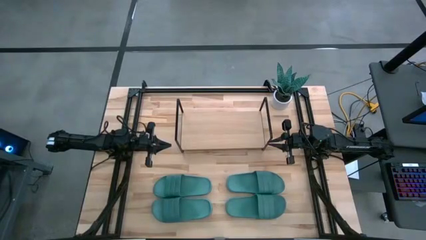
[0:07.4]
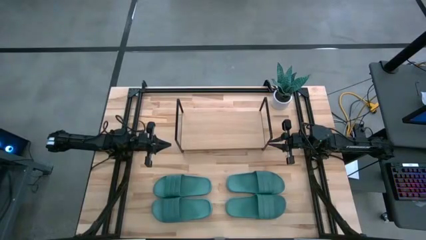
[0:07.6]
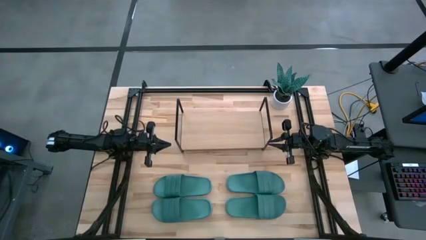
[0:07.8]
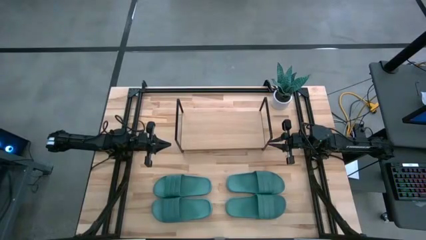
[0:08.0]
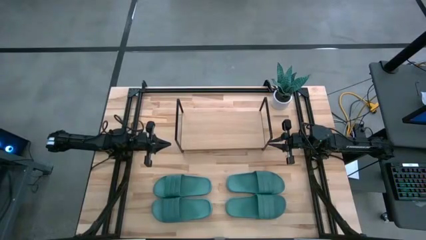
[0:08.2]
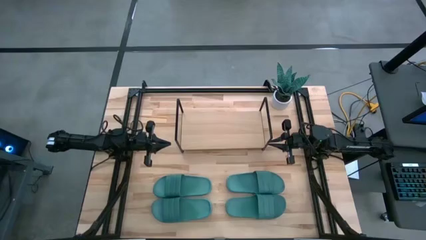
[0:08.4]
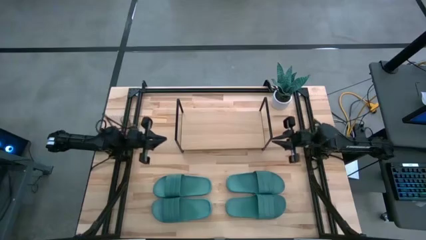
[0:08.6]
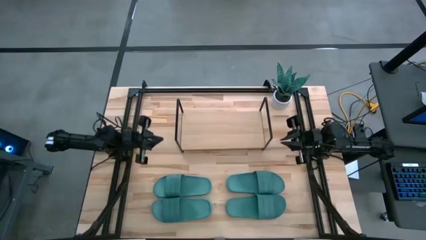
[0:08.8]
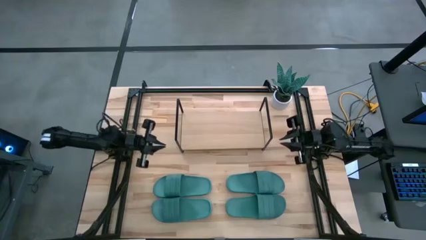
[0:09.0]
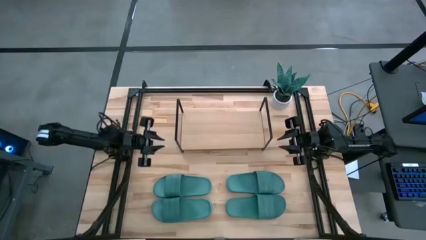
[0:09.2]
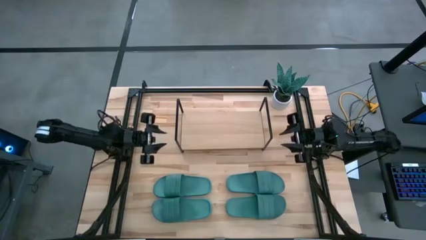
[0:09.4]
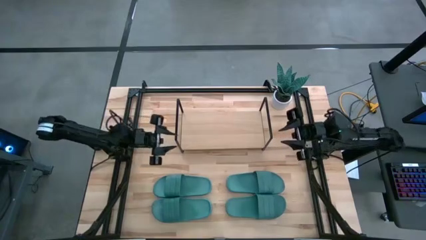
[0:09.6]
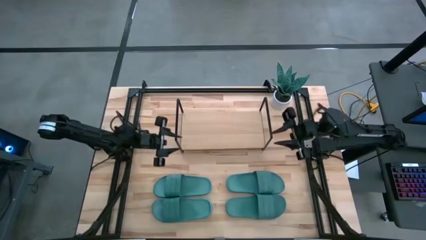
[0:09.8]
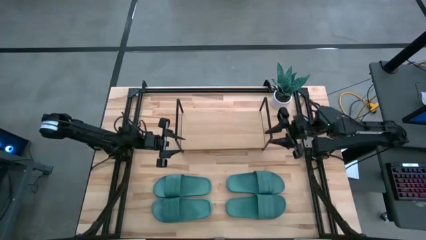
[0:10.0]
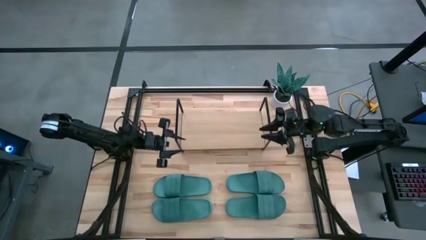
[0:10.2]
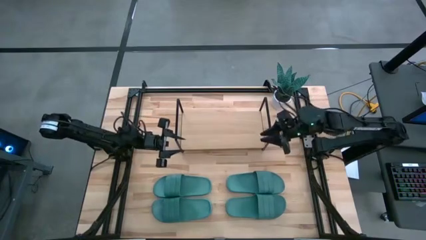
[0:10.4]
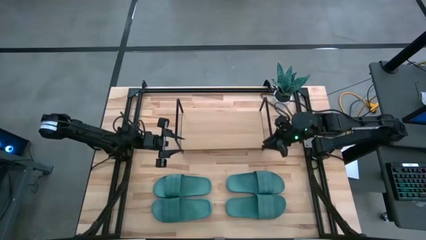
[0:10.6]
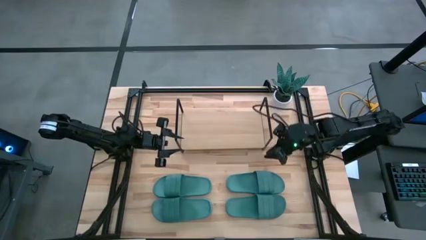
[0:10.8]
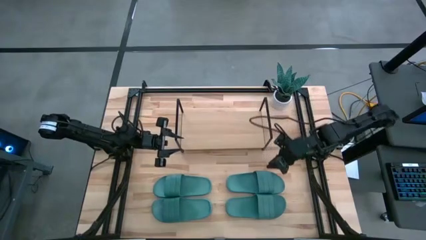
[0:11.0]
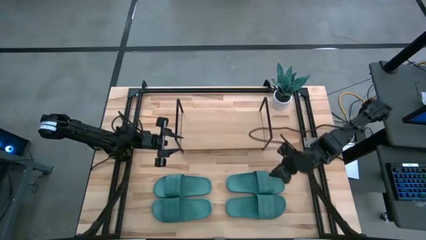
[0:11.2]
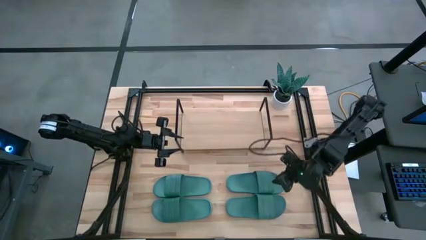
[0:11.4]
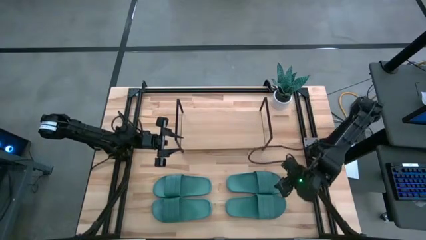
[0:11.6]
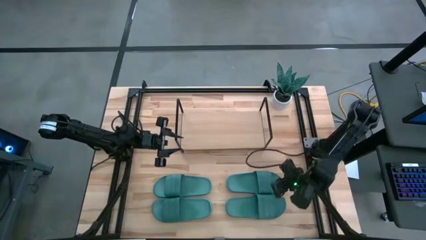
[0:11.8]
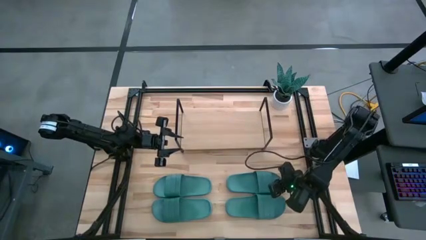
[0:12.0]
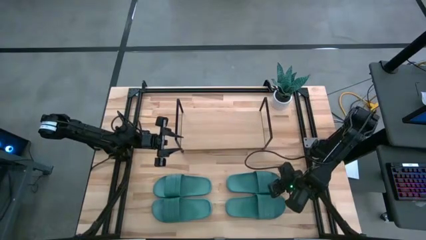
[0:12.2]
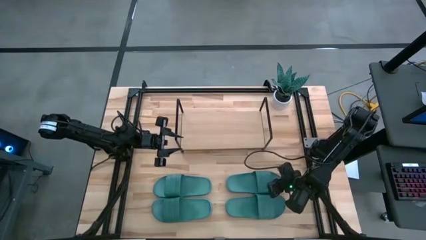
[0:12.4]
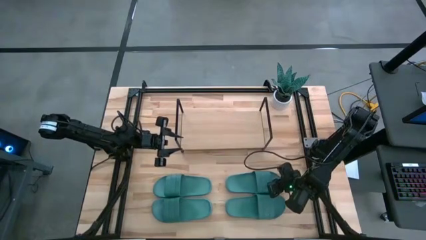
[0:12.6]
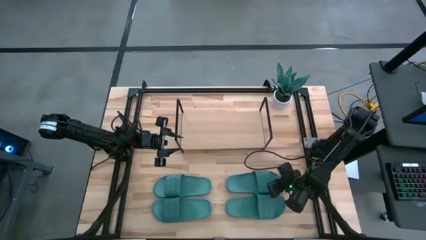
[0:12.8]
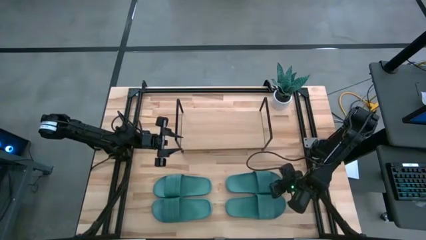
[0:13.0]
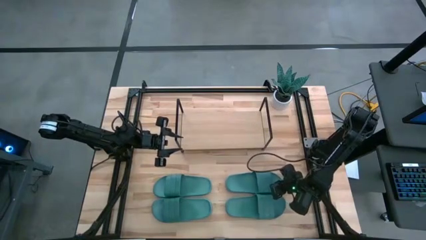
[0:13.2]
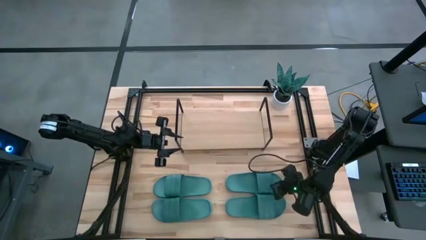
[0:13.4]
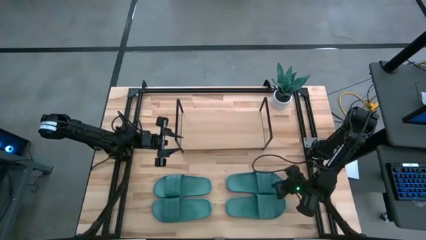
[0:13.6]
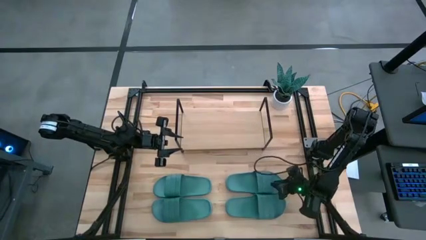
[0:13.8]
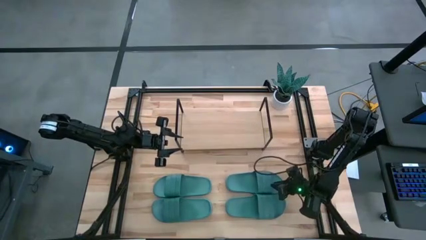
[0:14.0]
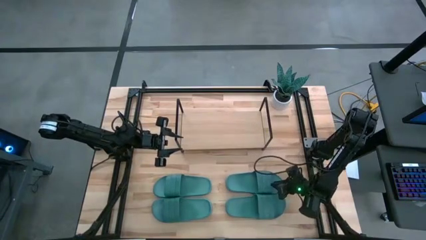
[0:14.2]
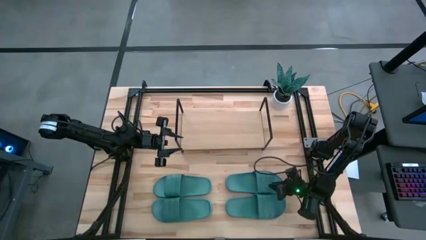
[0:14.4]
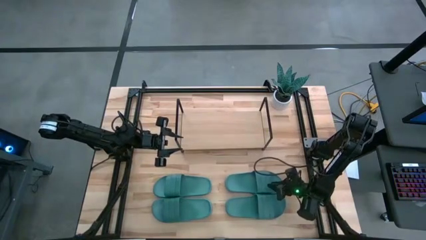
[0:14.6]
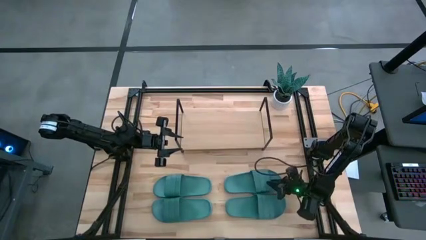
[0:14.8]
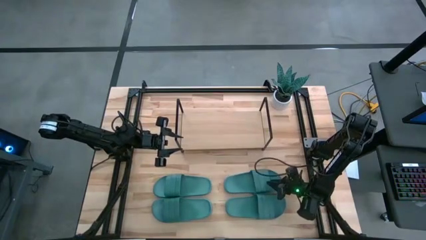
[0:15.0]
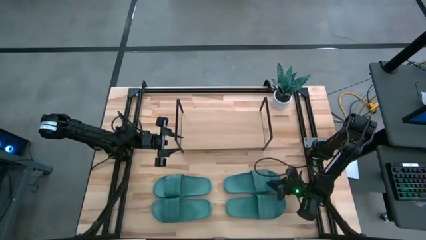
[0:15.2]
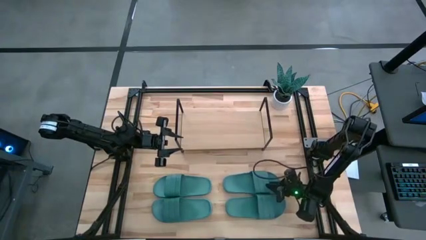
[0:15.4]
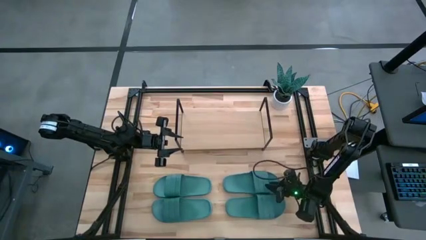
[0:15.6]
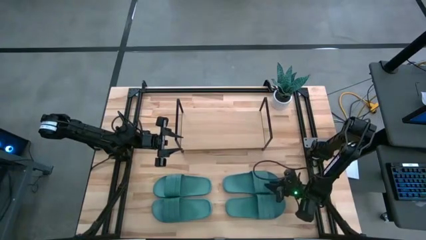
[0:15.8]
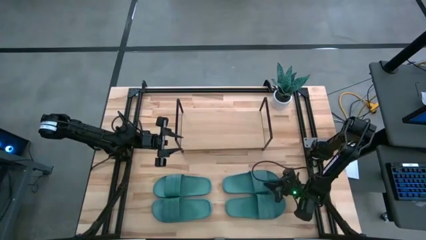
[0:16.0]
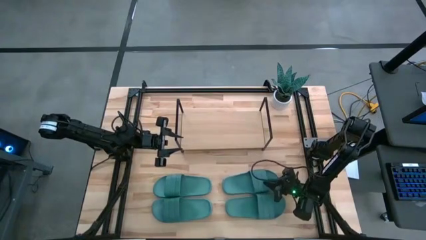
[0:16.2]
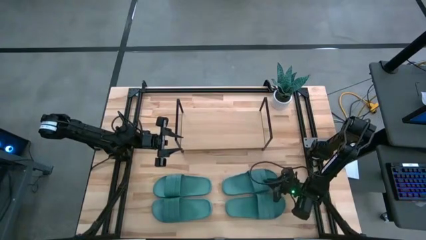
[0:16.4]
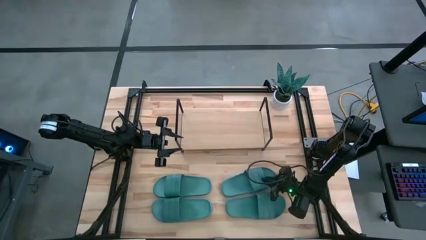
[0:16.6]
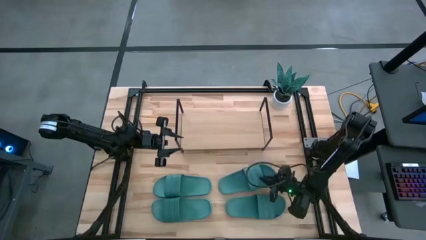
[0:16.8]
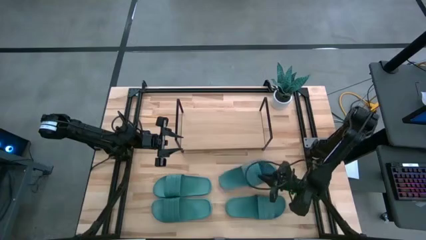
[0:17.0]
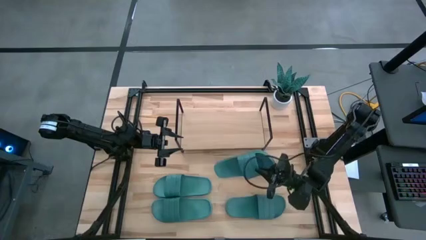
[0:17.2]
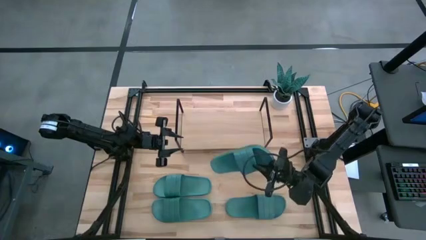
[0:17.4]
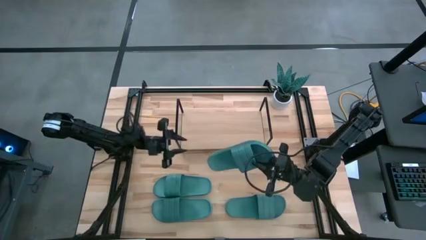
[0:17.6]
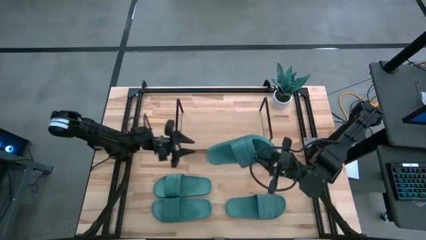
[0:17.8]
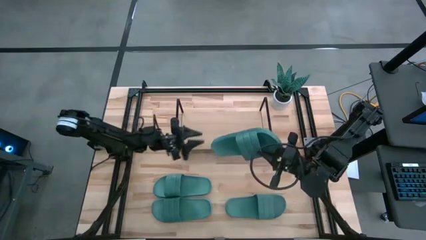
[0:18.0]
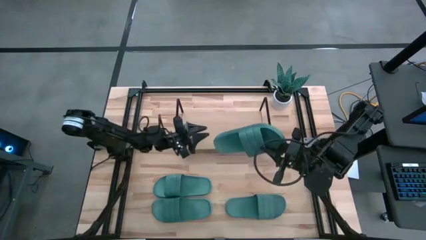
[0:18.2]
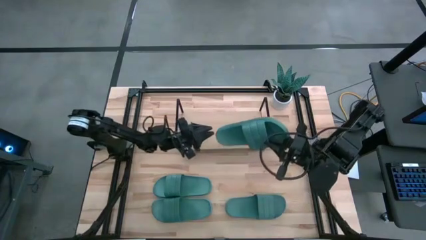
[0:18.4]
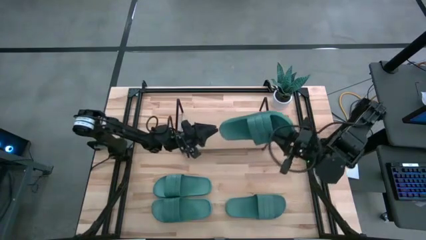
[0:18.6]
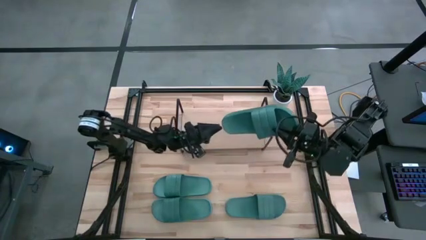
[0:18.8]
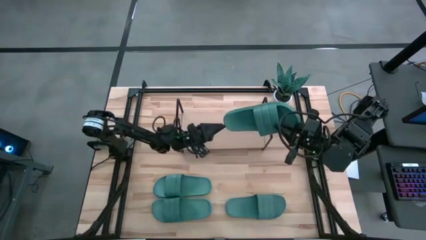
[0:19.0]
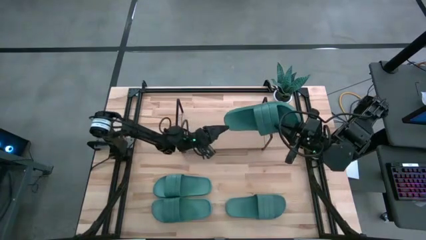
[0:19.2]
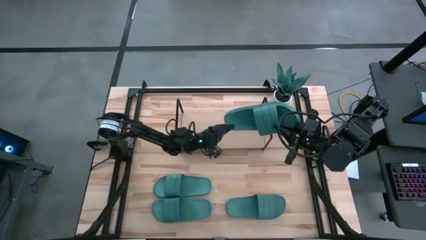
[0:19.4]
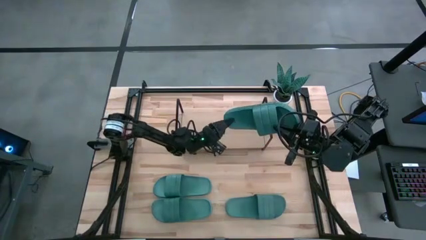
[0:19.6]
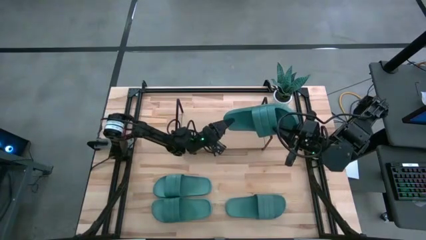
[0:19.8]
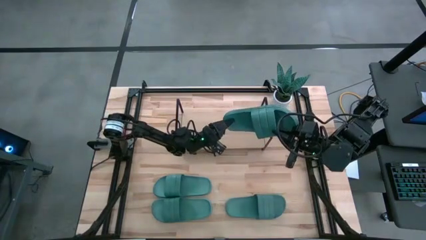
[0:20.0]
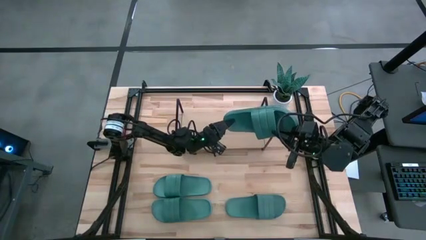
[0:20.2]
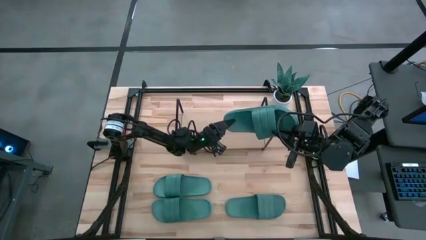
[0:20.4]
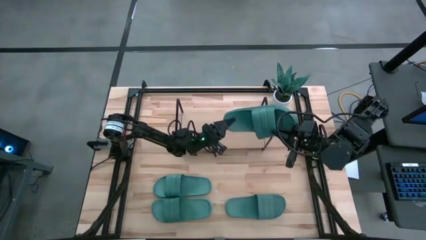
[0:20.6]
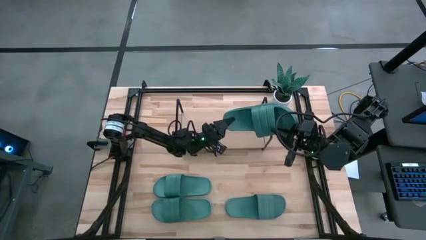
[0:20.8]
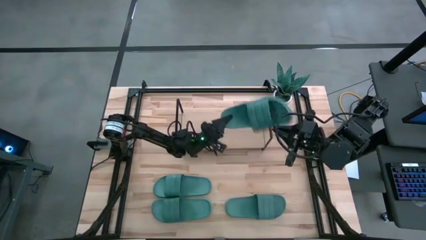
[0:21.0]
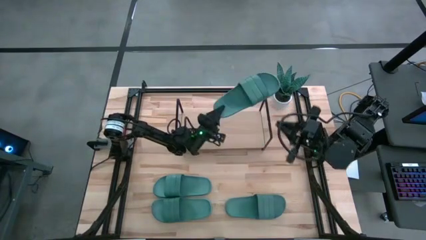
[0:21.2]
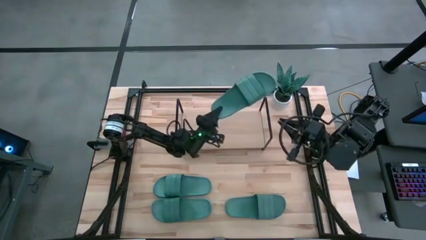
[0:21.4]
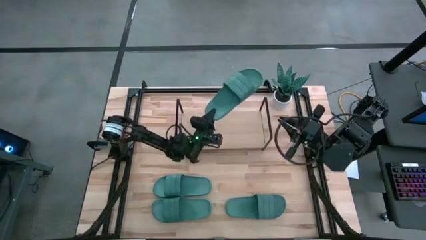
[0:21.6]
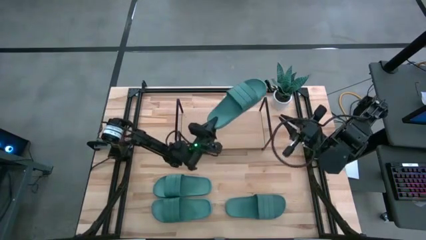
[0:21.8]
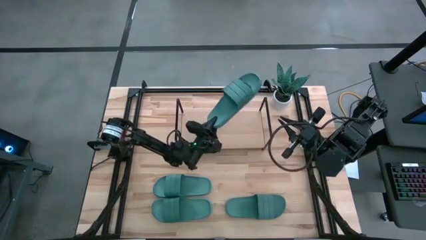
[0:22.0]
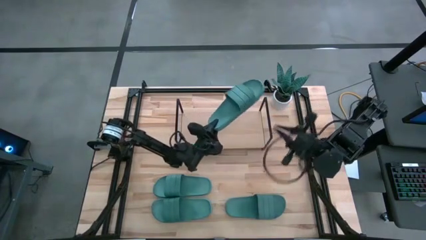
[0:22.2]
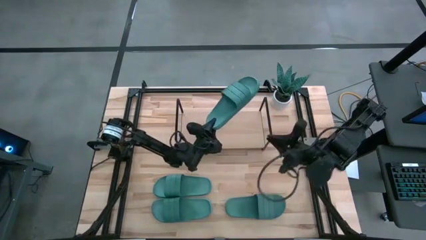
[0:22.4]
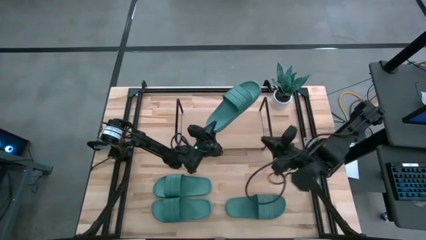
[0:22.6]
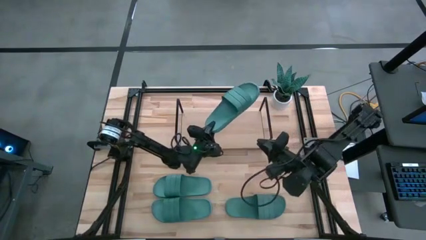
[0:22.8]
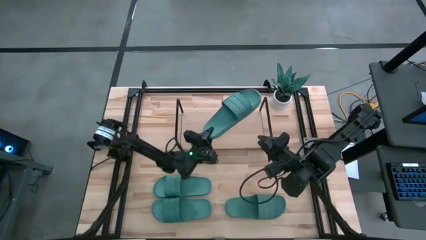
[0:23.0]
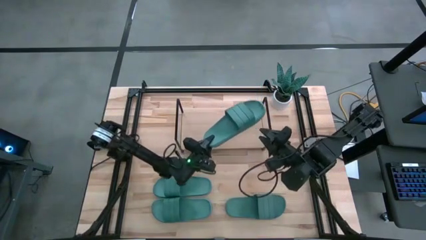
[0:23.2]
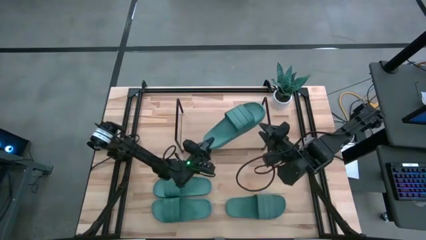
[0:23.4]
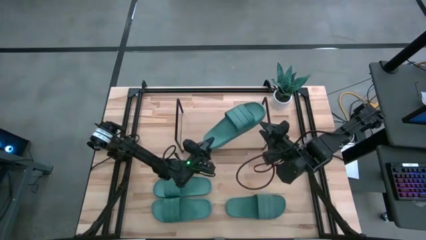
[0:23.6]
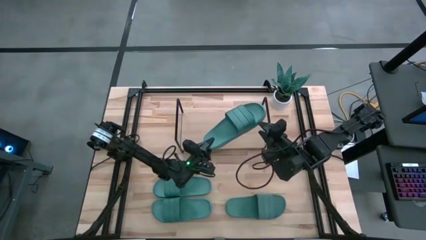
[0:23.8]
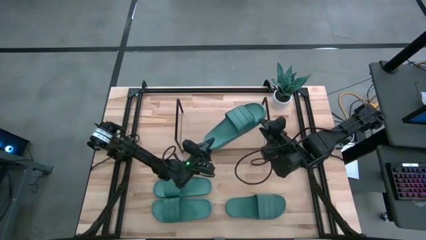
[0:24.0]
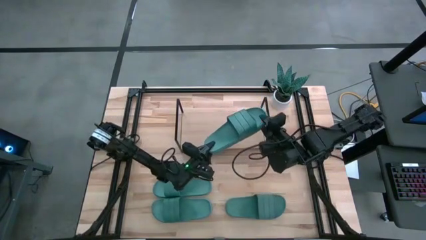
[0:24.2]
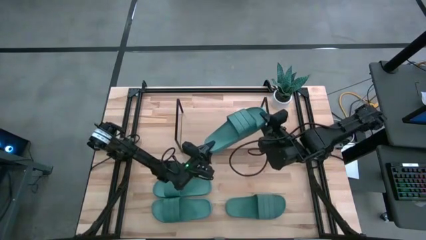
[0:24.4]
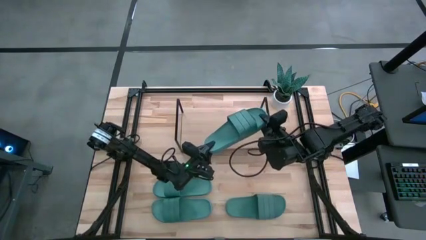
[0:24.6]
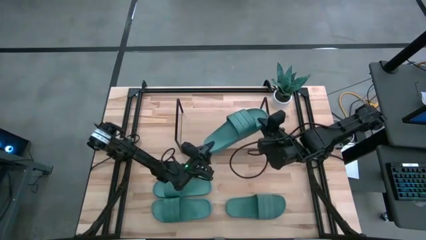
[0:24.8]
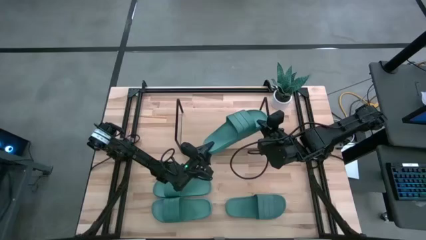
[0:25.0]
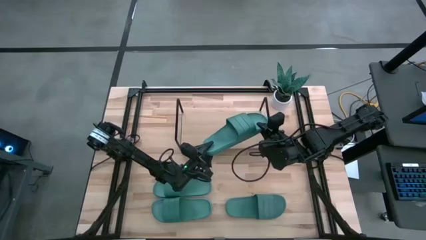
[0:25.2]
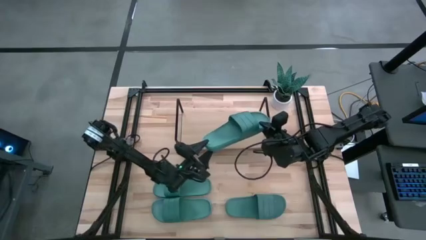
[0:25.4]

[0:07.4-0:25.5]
Task: Pick and place slides into the shelf
Put the green slipper on the shelf
